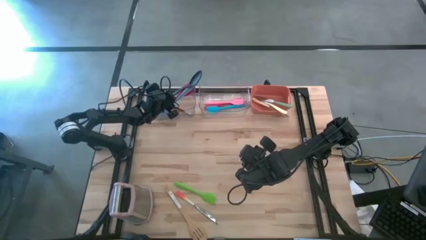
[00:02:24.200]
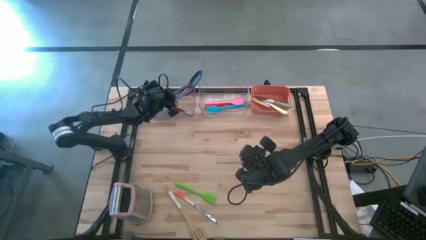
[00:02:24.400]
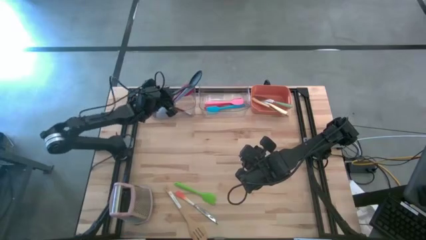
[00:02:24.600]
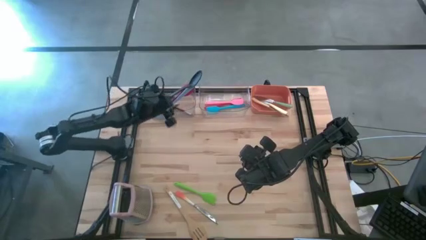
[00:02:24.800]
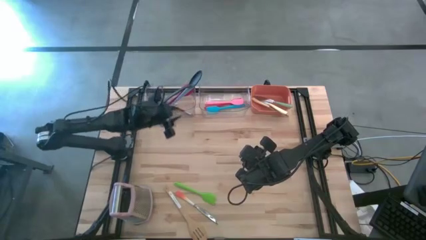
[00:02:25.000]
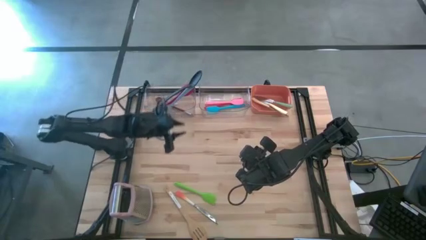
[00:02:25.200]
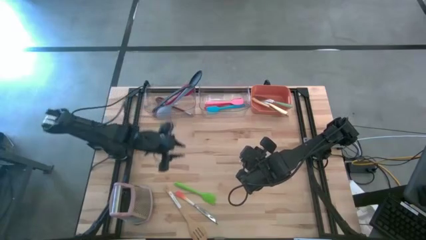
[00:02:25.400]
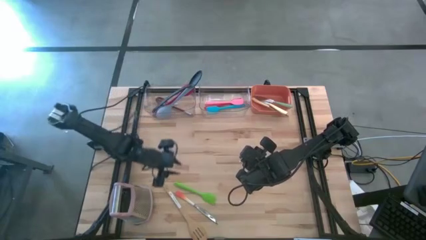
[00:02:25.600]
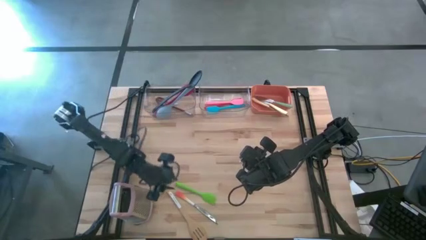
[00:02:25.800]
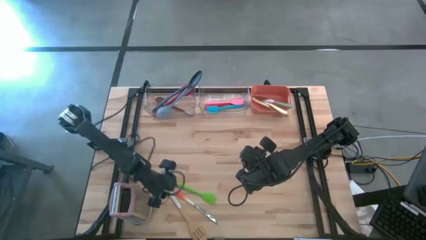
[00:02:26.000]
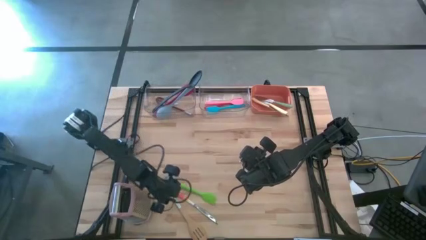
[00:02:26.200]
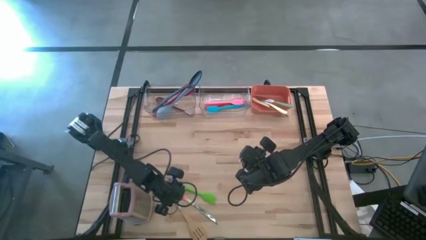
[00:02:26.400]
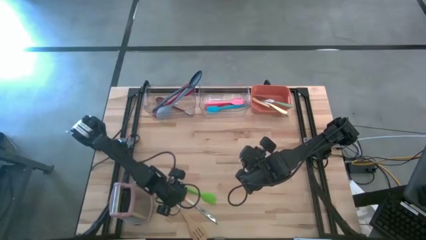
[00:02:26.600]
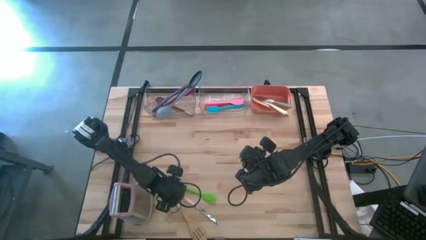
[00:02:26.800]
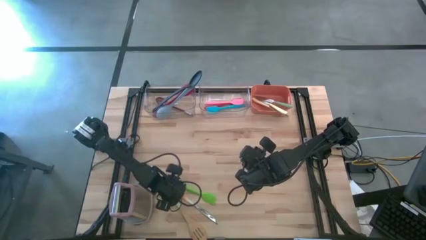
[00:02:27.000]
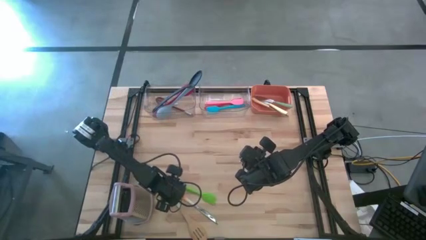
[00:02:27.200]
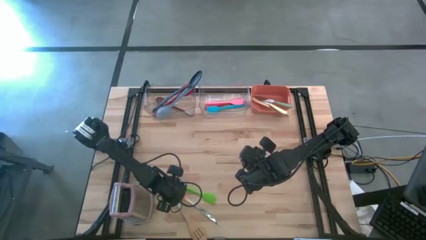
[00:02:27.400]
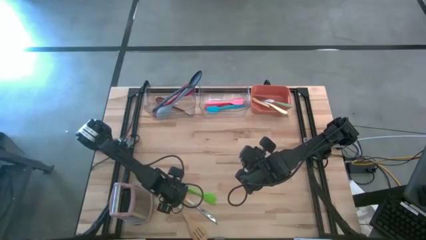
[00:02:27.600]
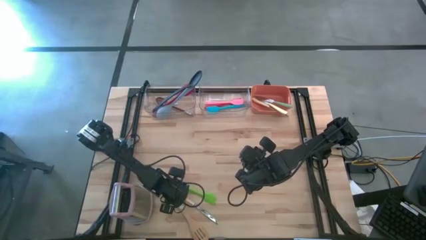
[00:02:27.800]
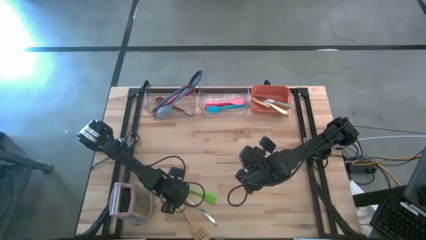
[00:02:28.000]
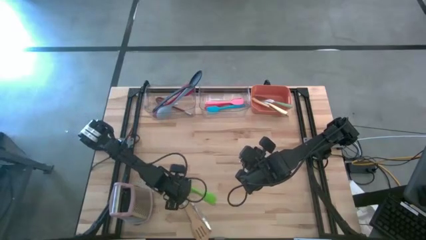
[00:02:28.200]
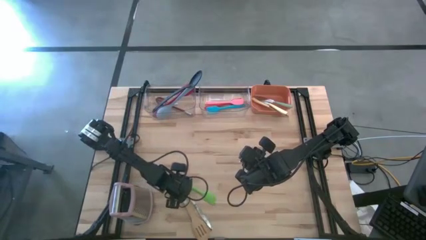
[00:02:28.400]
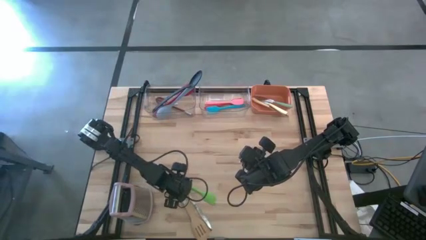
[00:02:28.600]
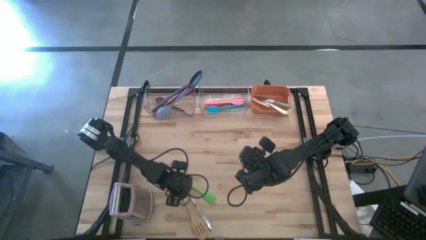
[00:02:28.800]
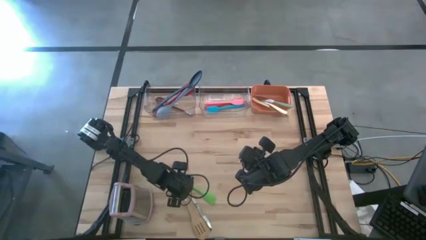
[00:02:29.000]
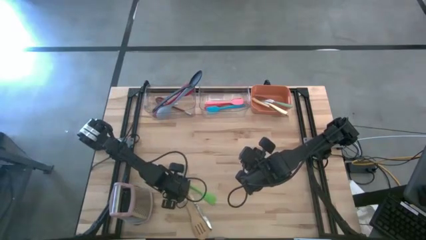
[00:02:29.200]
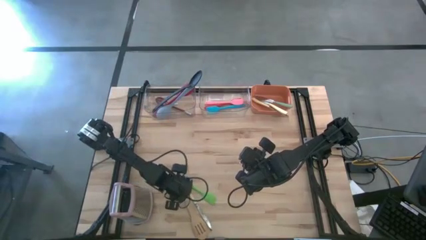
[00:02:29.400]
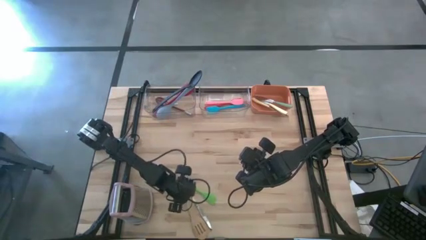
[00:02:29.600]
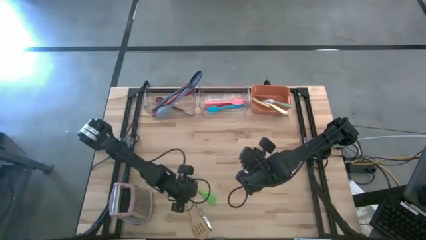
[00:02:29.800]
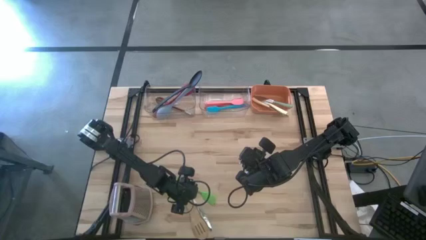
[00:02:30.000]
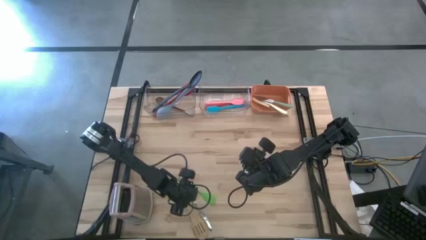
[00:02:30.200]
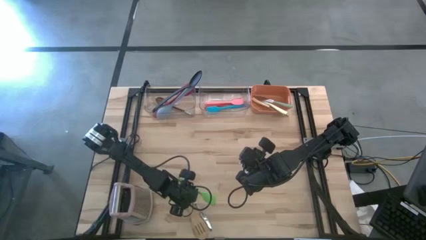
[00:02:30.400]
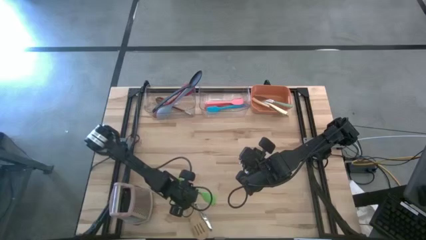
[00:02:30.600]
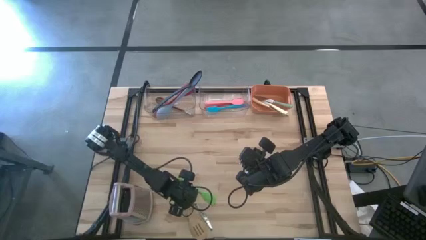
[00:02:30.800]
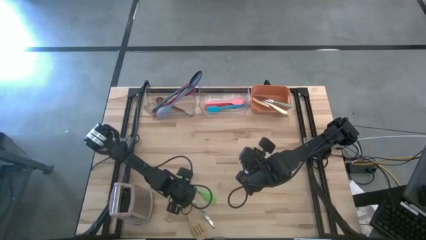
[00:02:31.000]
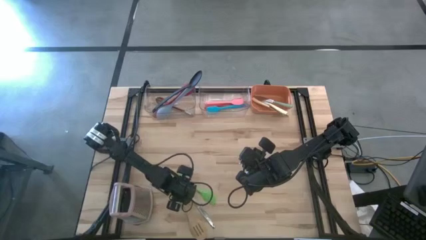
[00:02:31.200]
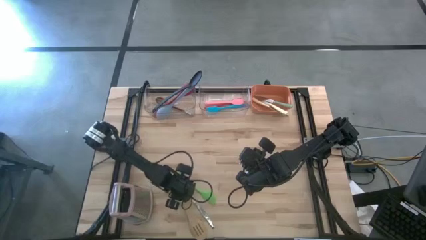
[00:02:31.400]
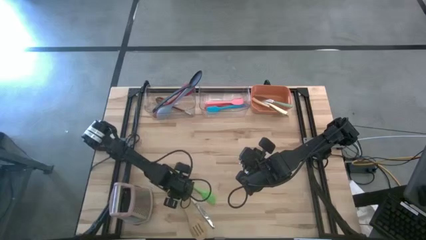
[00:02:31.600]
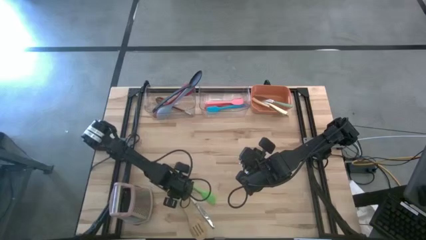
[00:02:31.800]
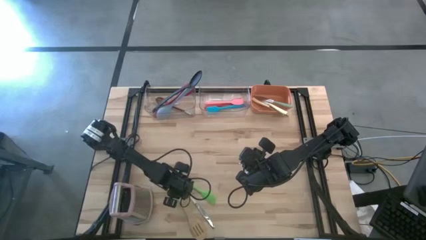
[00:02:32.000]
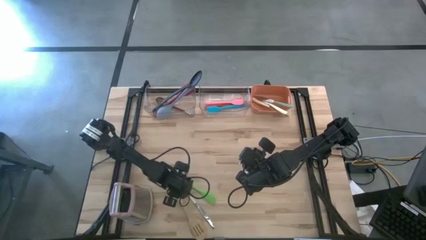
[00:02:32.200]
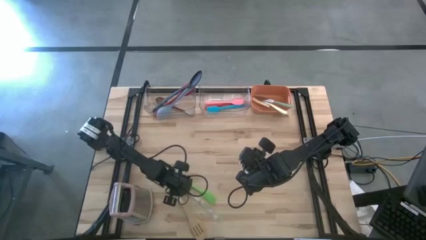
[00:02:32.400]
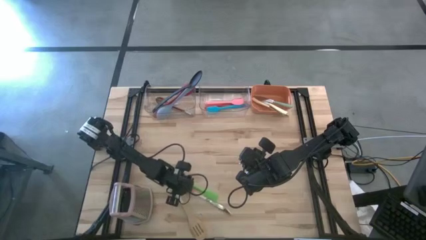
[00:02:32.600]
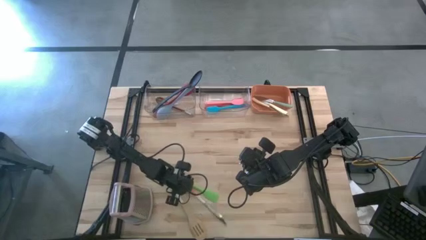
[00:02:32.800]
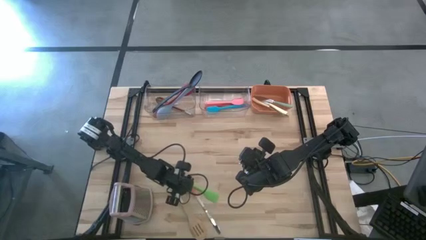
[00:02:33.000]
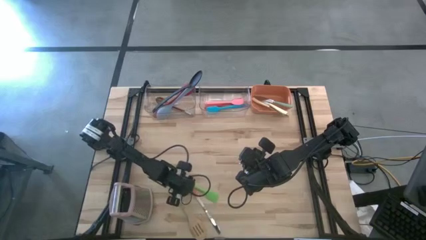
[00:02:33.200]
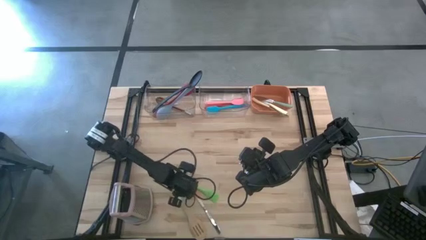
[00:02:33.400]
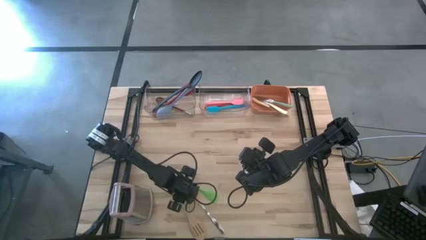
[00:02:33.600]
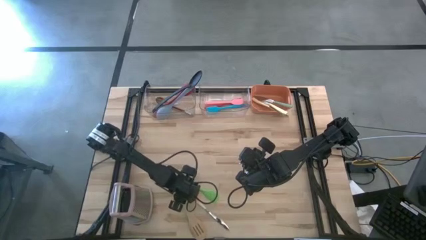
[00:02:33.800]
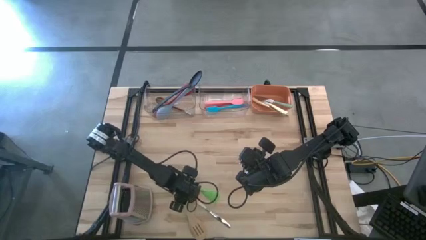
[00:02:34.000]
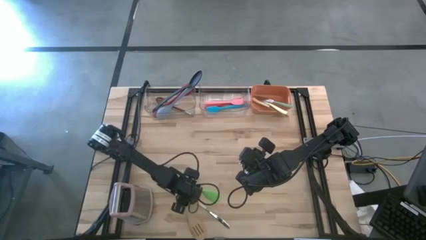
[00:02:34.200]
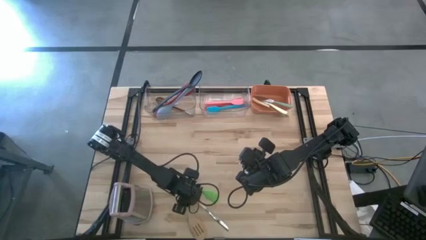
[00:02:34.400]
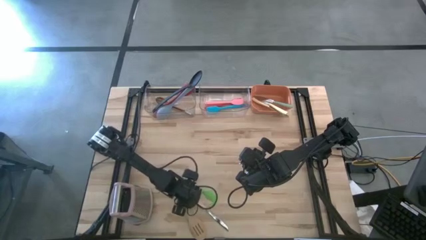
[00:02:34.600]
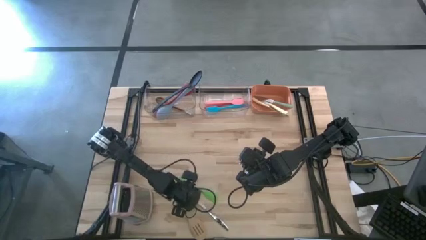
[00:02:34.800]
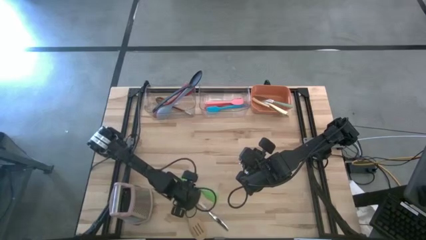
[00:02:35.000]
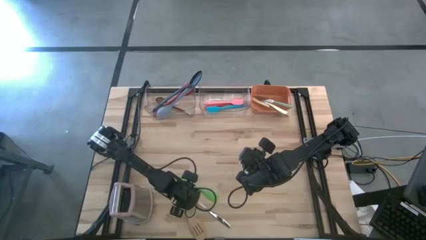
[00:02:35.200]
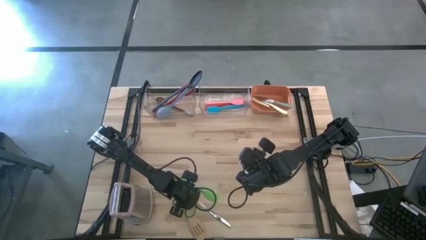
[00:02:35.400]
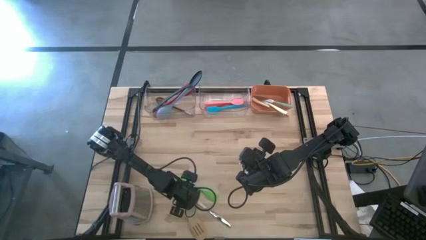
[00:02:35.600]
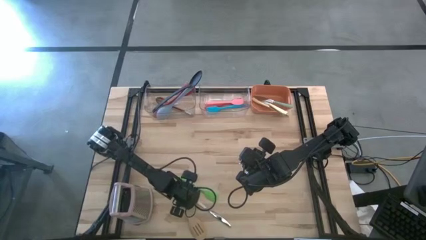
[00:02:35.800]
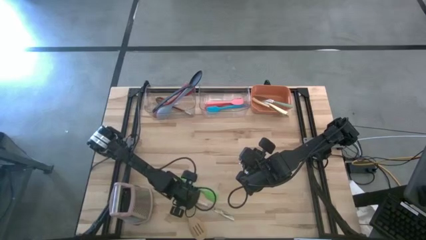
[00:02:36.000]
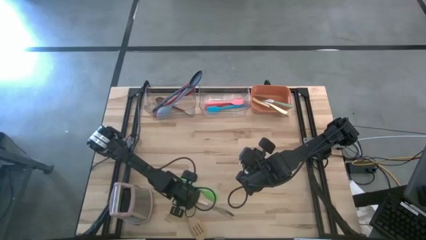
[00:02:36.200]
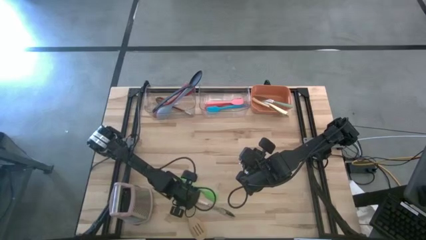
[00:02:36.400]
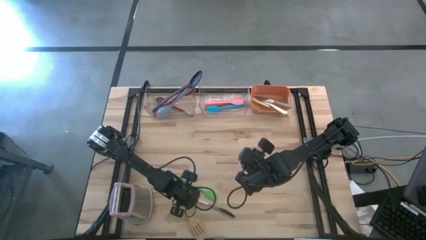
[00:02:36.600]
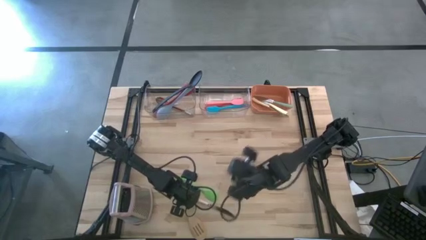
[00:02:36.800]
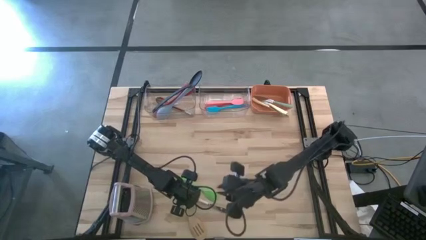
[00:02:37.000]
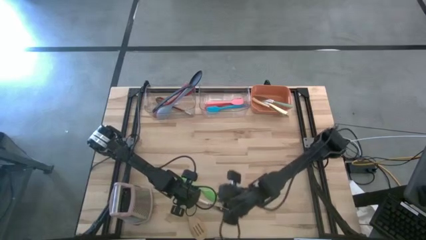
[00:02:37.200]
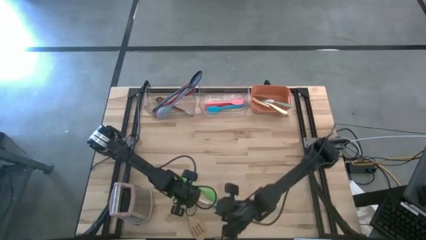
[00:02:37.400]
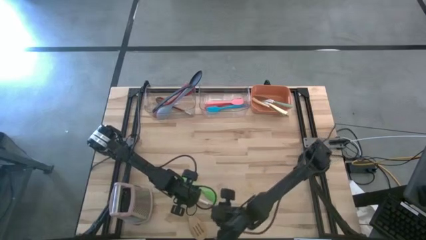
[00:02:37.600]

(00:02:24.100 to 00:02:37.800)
Task: Pick & Place Kitchen Items
Put the orange knife into the orange bin
